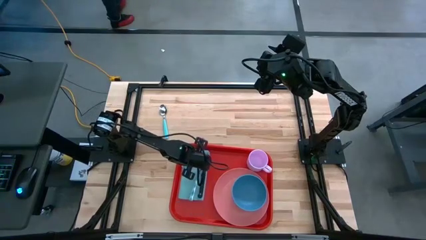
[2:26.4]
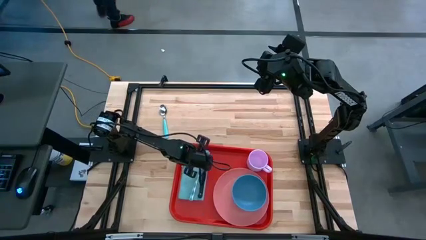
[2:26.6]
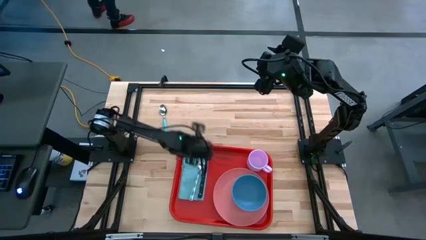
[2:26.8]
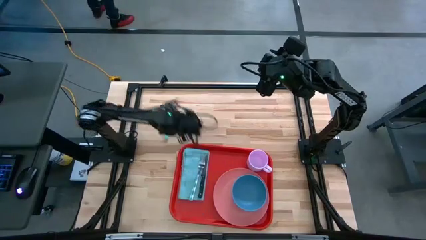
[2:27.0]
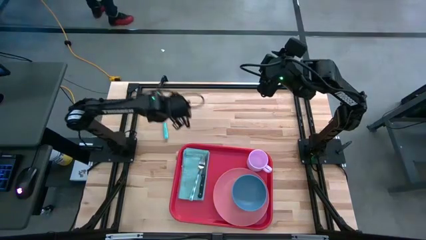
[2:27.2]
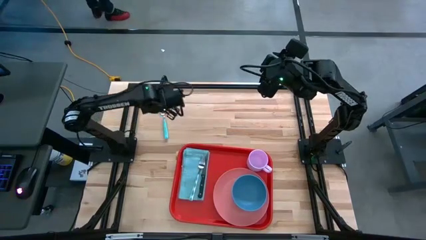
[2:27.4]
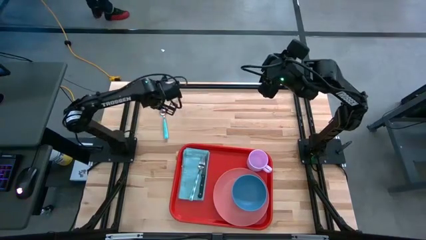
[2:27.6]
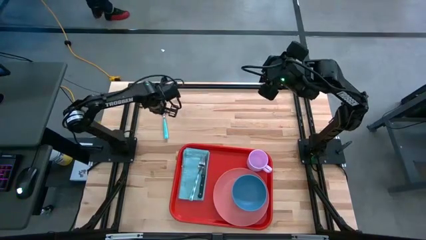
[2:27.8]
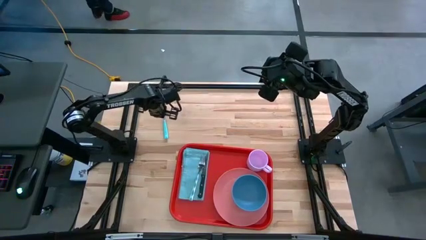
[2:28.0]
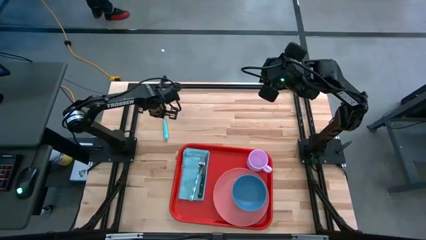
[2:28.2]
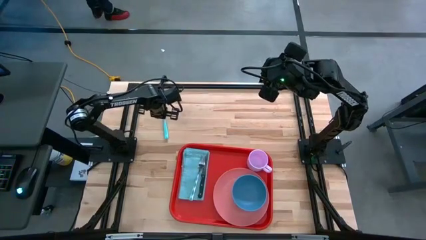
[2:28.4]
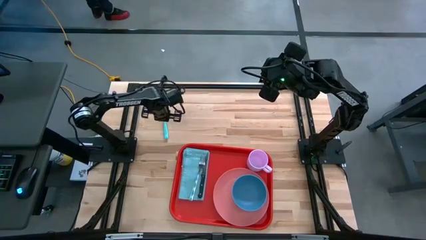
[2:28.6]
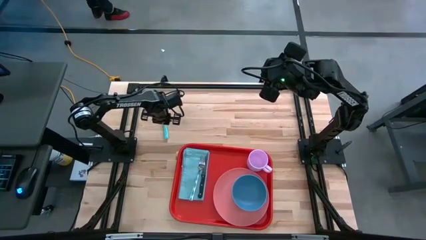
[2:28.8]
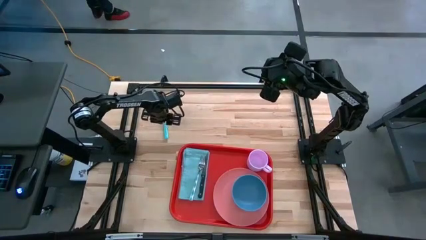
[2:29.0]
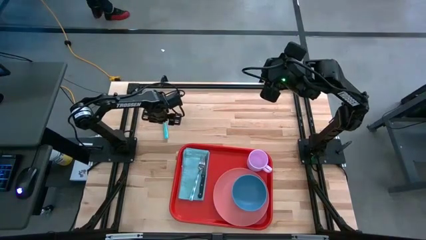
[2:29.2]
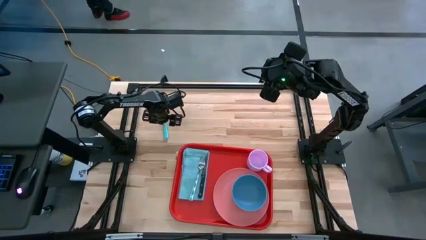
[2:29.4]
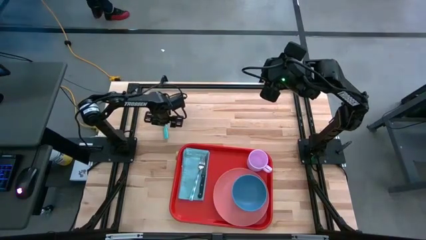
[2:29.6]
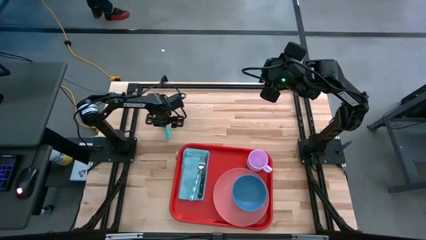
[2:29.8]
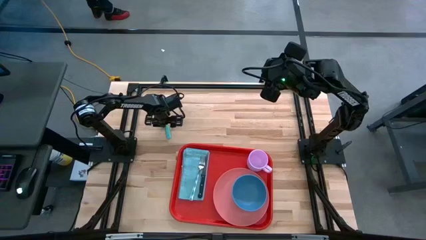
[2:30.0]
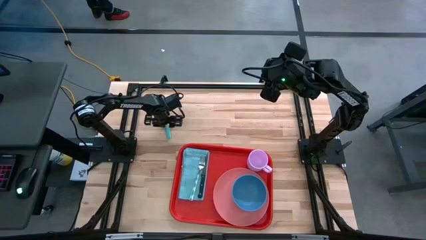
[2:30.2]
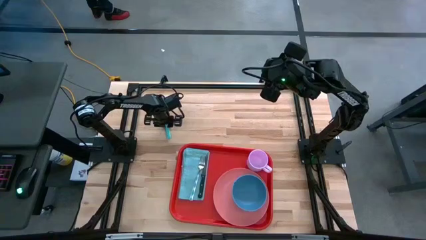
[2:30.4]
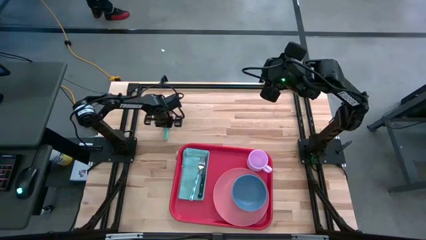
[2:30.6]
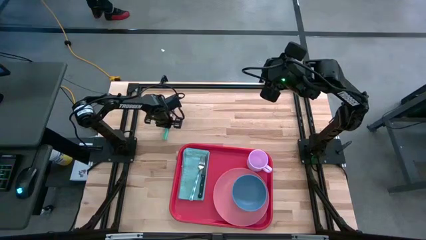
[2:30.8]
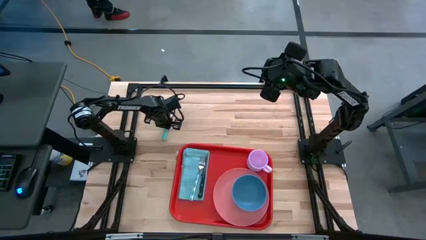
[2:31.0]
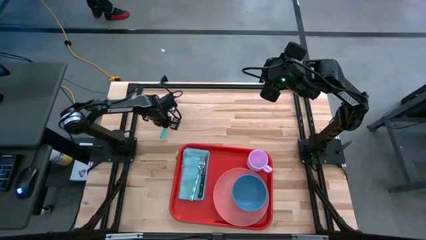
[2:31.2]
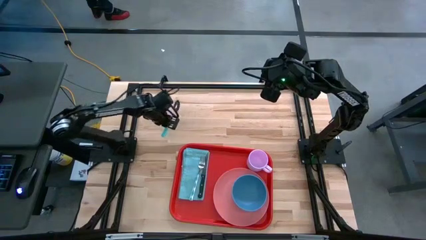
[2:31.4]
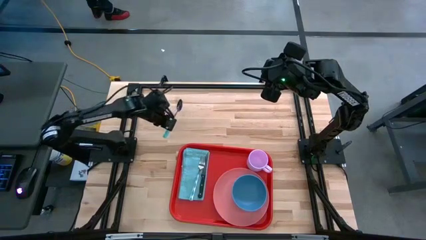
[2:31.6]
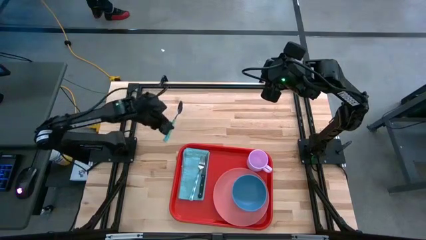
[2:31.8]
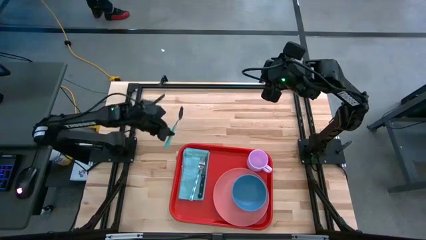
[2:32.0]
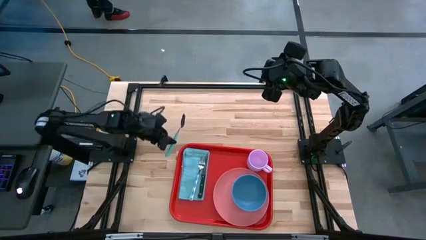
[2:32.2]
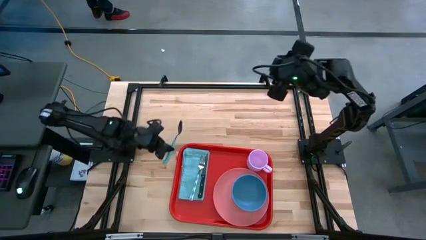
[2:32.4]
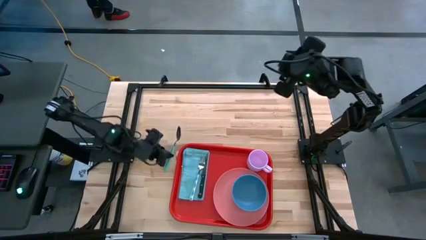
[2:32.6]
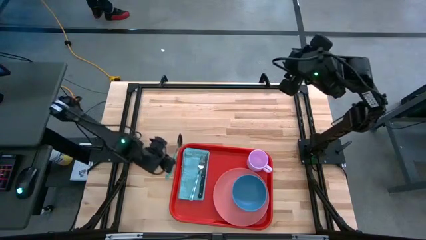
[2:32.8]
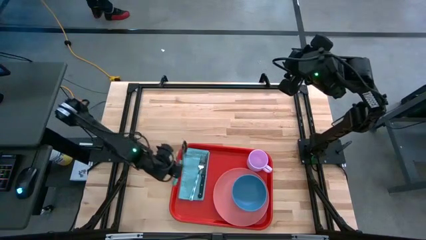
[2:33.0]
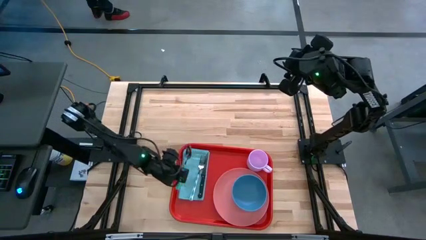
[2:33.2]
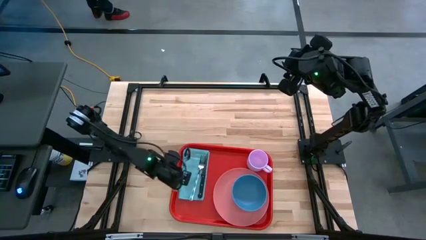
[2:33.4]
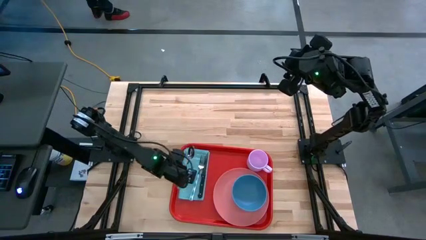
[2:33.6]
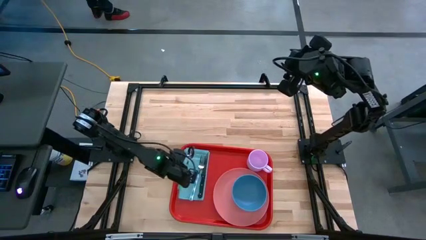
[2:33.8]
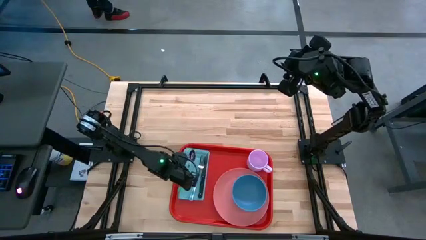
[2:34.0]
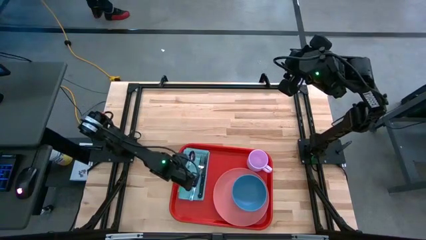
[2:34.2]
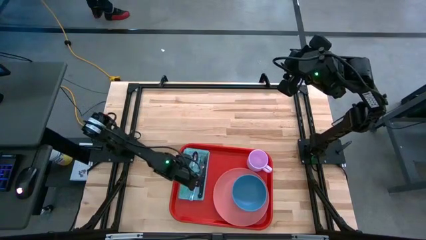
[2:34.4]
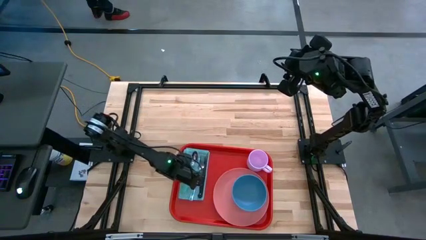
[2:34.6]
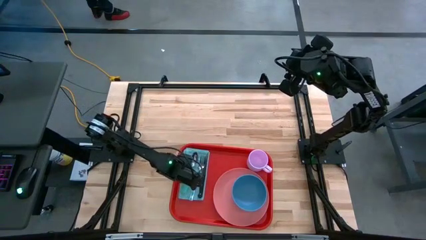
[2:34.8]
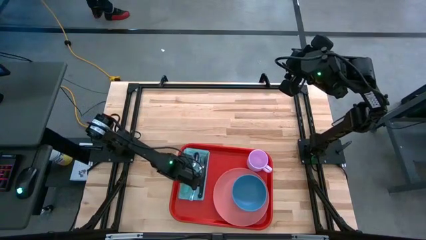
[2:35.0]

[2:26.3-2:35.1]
Task: Set up tray
Put the blue spoon on the blue table napkin to the left of the blue fork

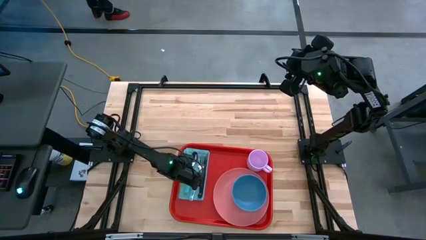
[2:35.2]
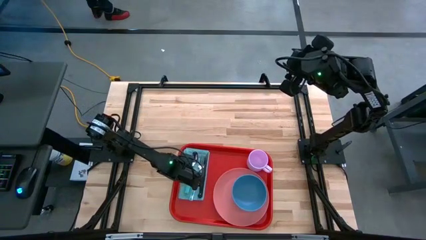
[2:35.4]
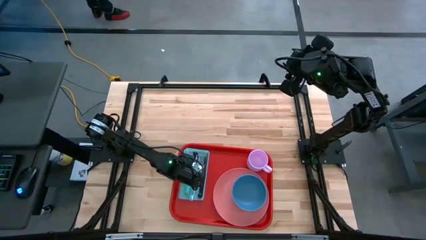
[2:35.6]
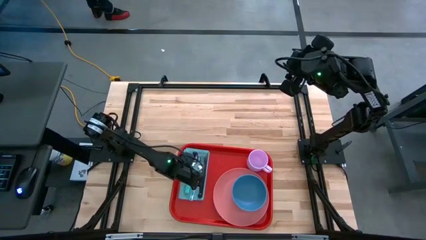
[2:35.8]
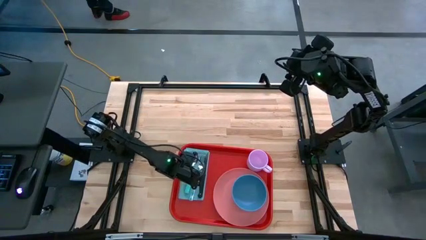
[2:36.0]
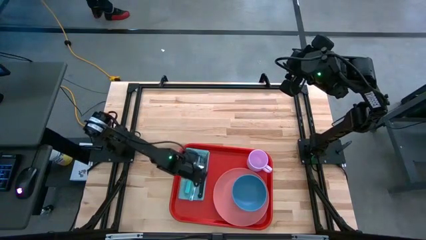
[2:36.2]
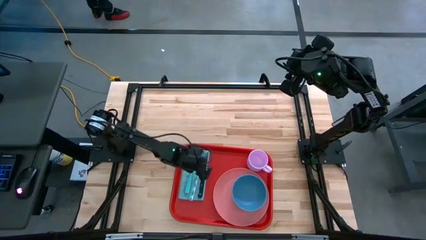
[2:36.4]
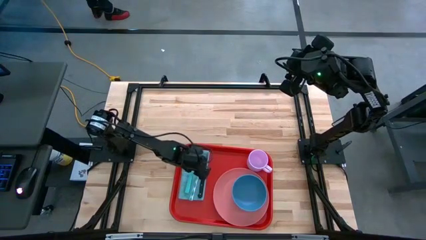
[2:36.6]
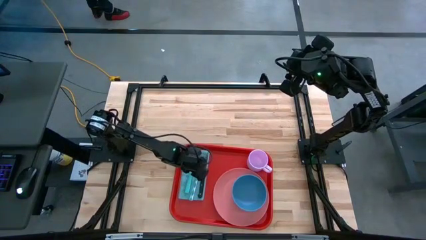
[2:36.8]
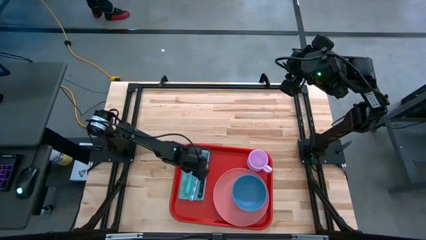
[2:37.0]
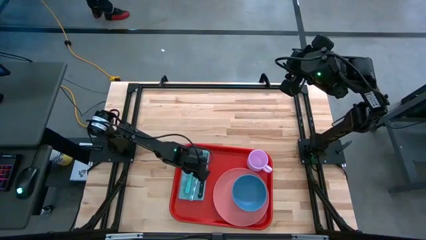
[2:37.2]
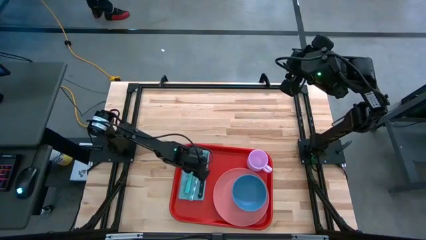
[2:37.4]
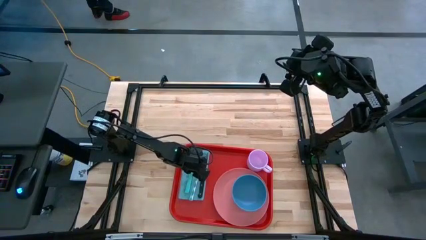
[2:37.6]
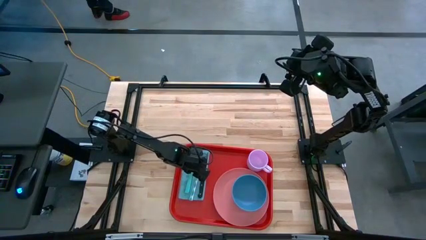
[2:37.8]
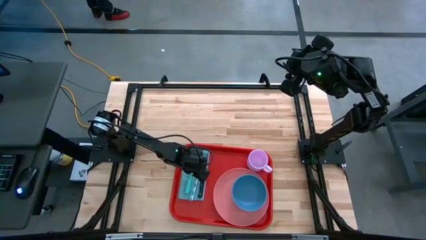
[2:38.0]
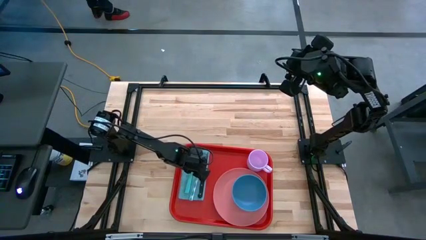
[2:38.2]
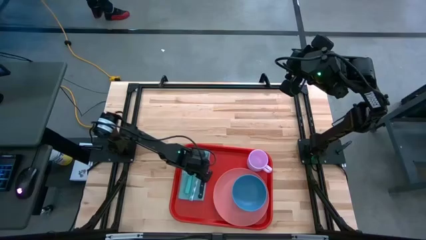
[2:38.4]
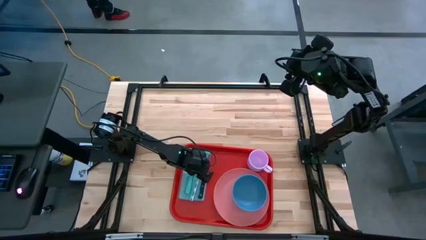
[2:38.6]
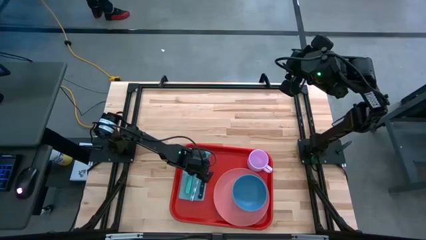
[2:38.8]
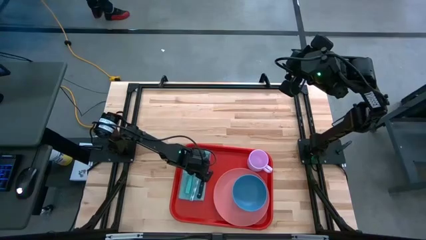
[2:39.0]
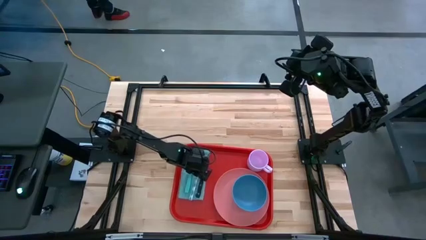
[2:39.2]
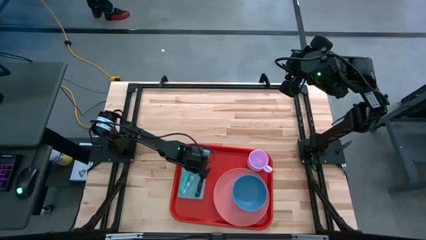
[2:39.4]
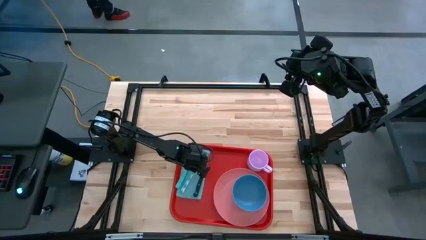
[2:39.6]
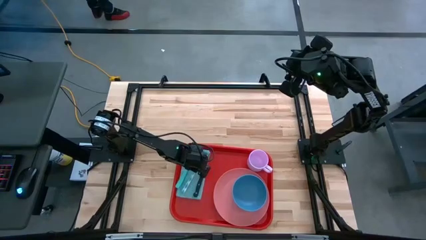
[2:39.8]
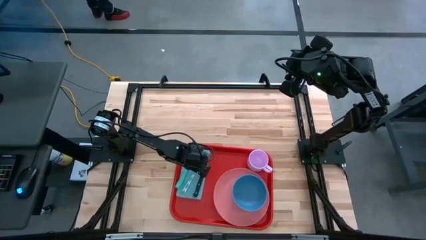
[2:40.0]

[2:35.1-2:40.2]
Adjust the blue fork

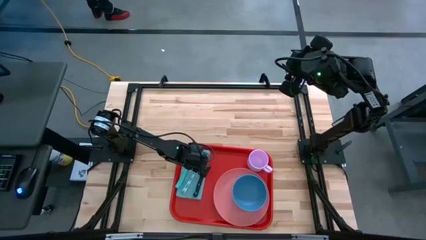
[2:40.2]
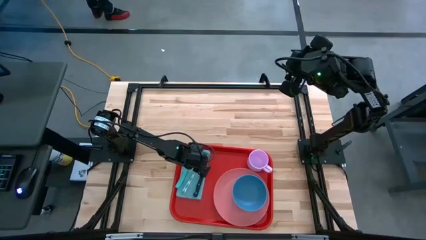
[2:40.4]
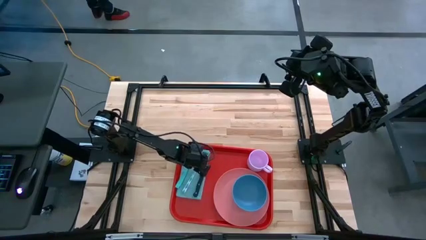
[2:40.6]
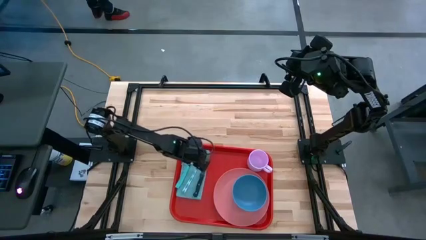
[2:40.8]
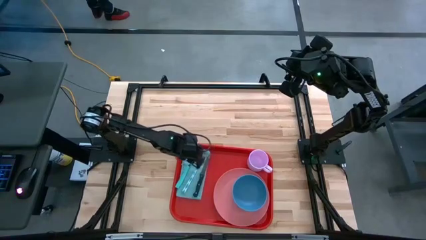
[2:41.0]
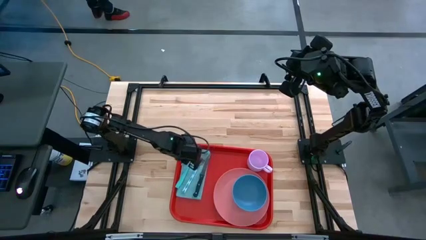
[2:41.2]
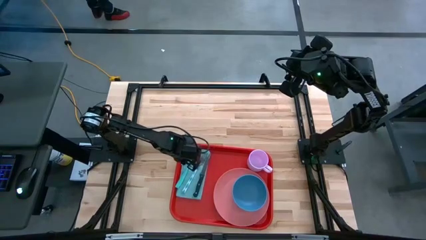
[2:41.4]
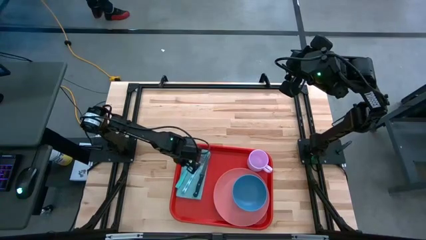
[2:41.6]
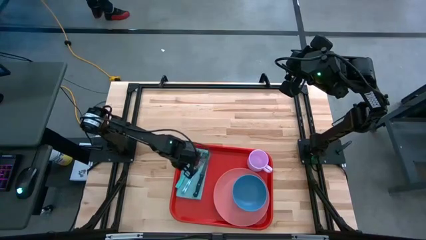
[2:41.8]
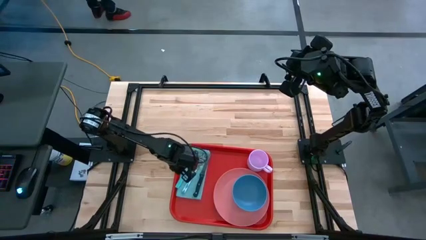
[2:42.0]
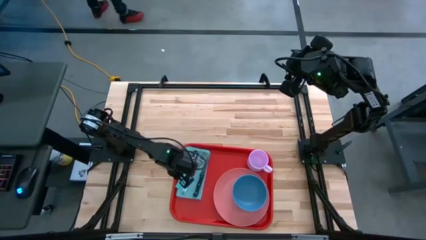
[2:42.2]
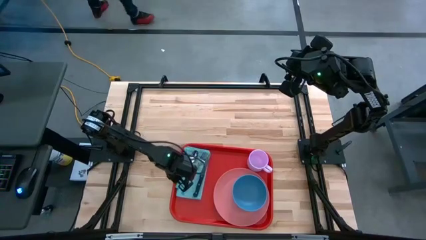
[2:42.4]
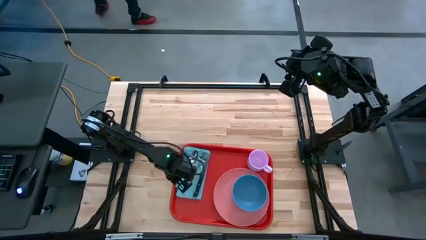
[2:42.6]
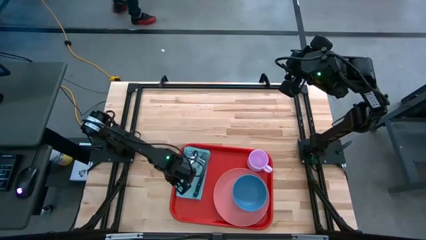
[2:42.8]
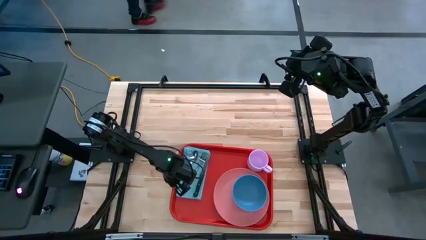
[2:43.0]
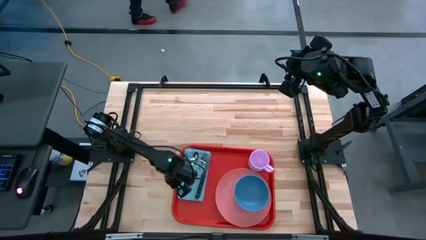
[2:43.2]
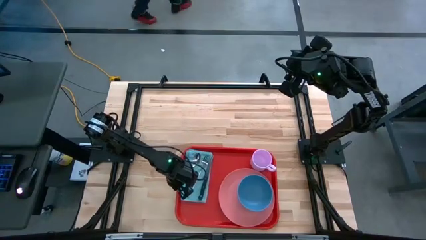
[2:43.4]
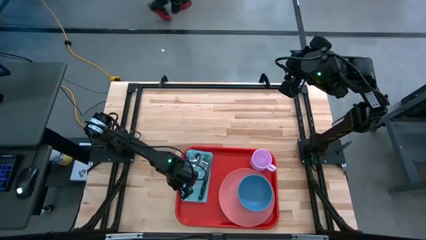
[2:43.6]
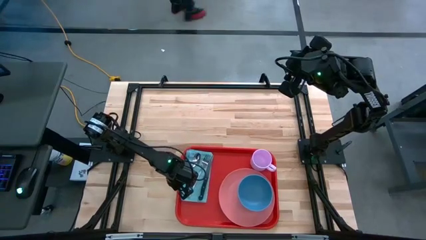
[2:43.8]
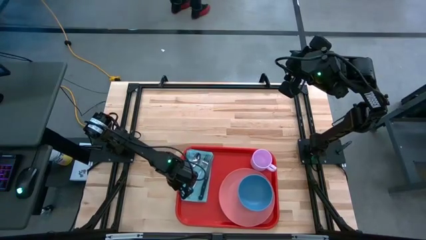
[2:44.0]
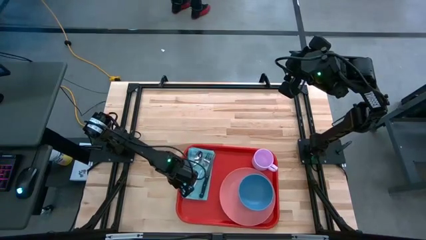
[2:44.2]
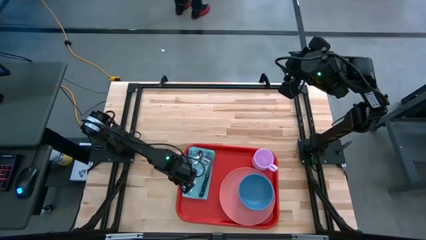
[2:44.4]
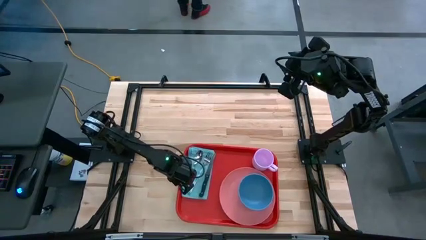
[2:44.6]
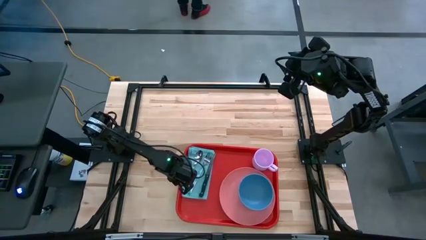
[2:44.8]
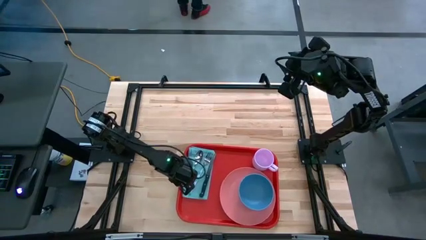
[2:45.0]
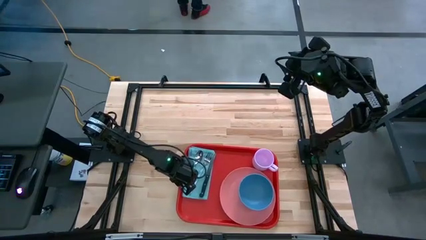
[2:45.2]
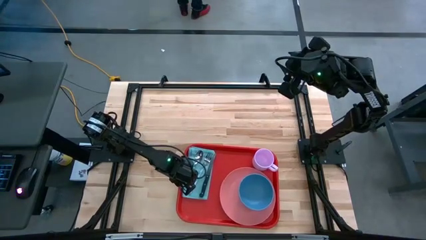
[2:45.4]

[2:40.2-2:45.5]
Adjust the red serving tray
